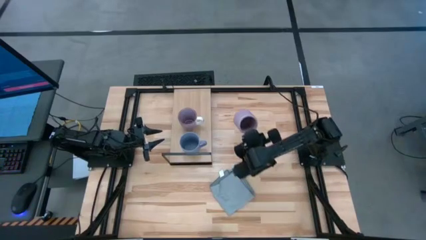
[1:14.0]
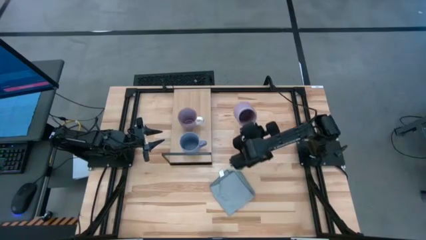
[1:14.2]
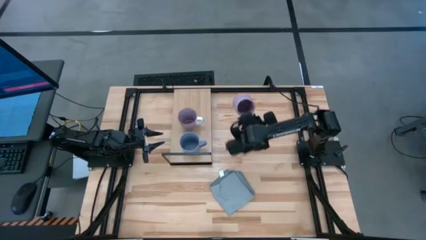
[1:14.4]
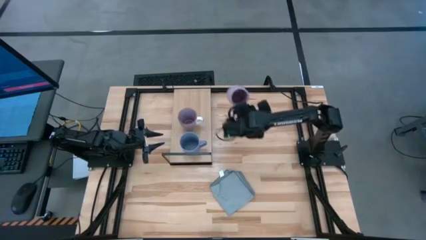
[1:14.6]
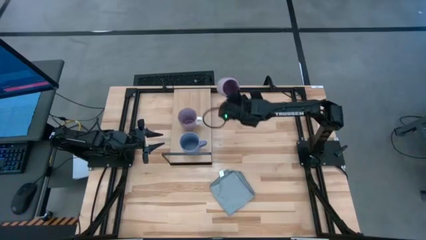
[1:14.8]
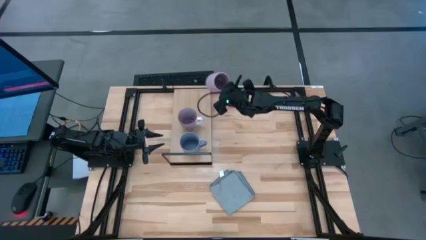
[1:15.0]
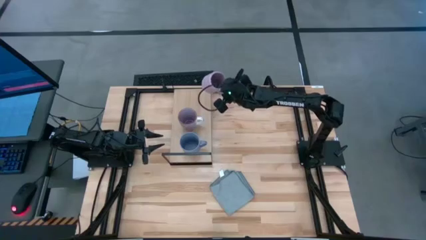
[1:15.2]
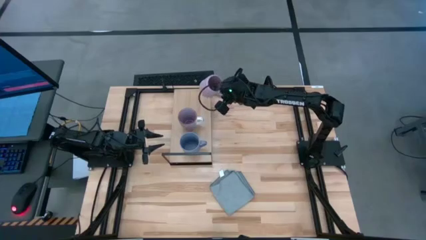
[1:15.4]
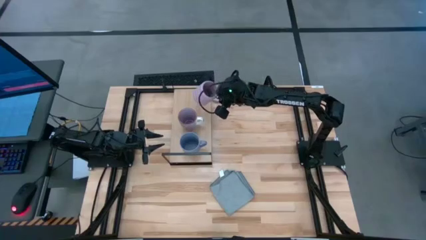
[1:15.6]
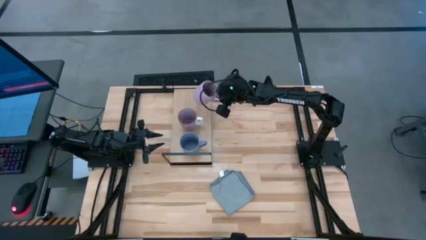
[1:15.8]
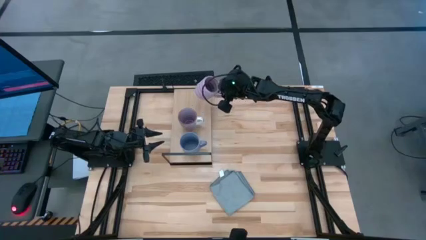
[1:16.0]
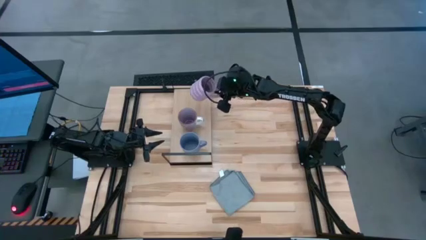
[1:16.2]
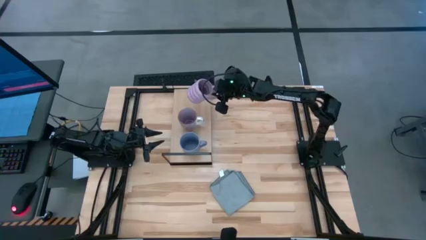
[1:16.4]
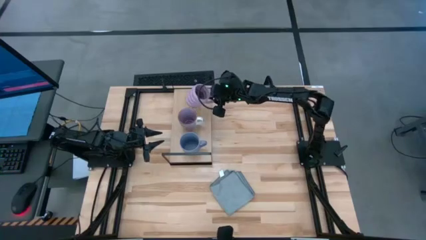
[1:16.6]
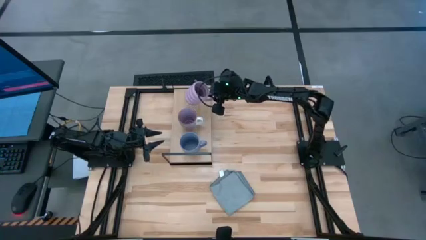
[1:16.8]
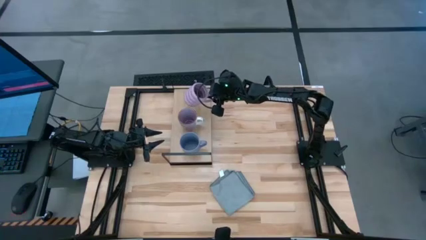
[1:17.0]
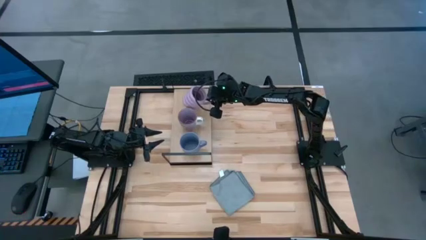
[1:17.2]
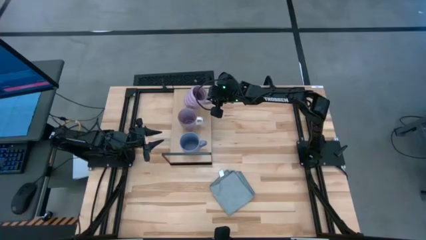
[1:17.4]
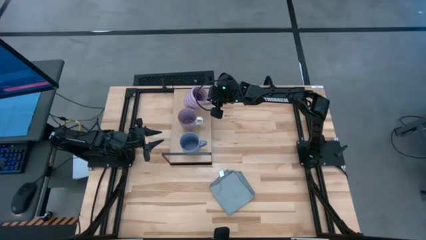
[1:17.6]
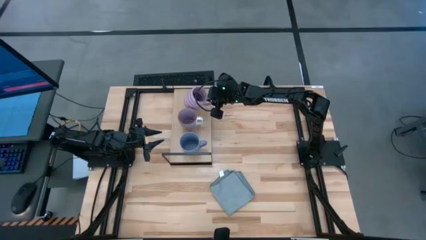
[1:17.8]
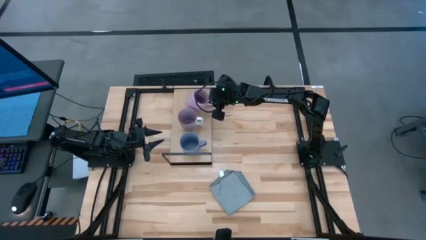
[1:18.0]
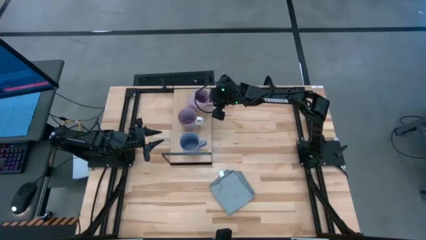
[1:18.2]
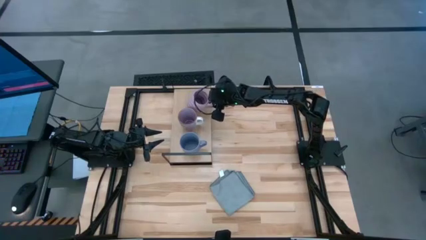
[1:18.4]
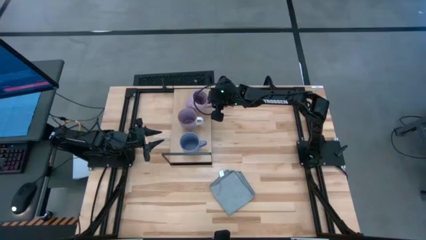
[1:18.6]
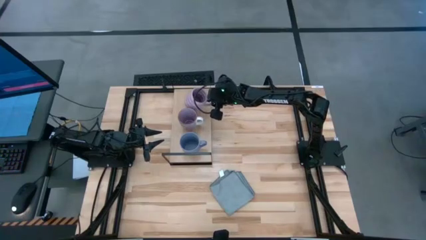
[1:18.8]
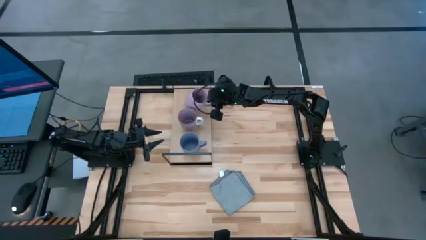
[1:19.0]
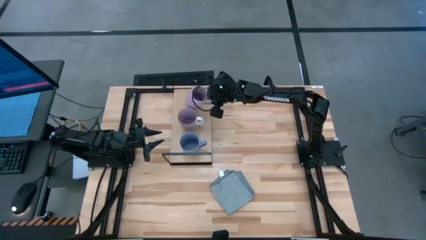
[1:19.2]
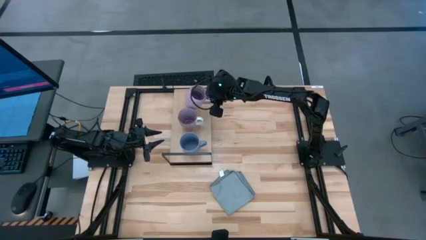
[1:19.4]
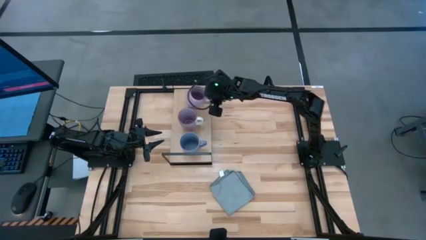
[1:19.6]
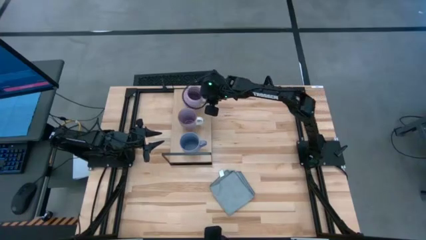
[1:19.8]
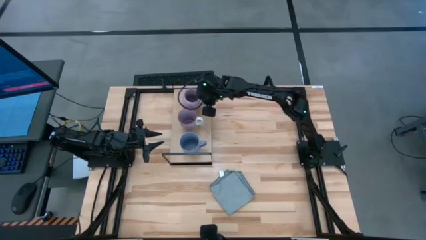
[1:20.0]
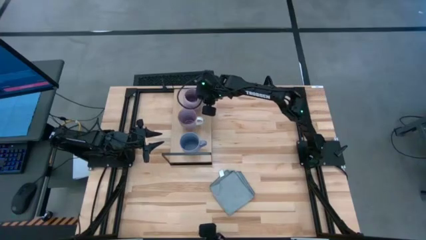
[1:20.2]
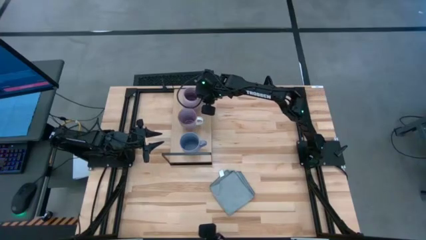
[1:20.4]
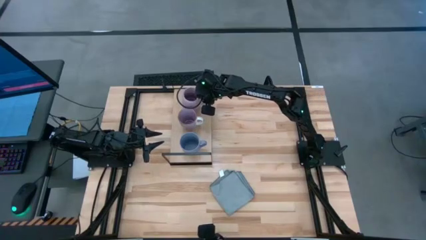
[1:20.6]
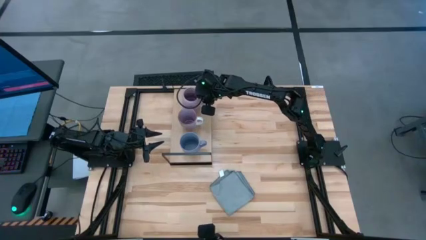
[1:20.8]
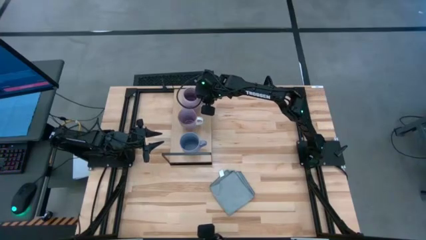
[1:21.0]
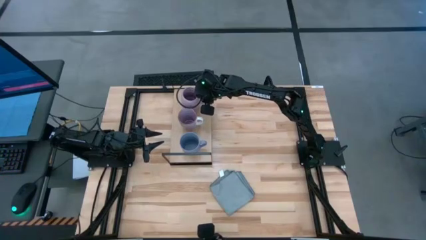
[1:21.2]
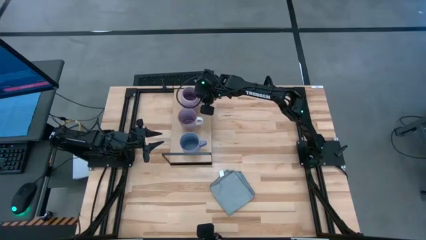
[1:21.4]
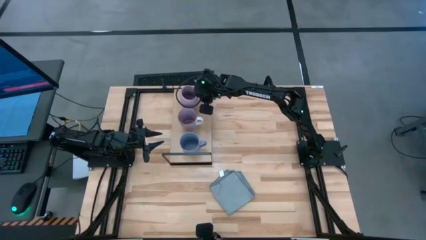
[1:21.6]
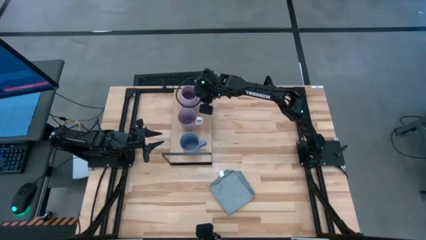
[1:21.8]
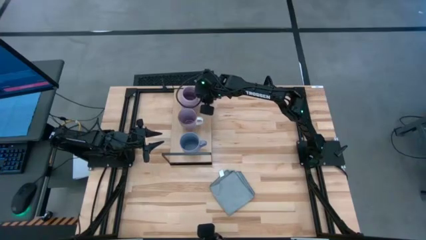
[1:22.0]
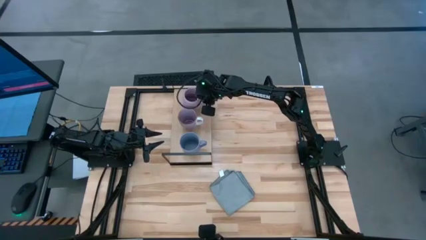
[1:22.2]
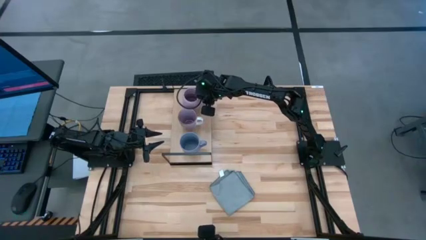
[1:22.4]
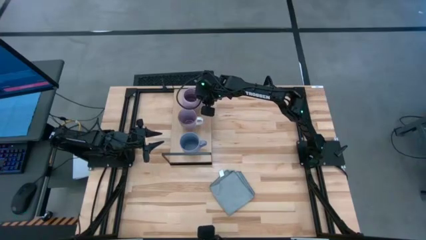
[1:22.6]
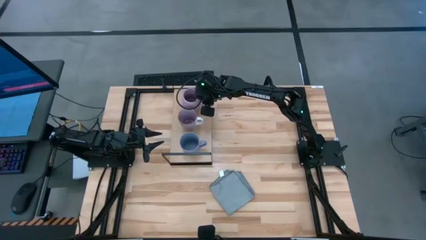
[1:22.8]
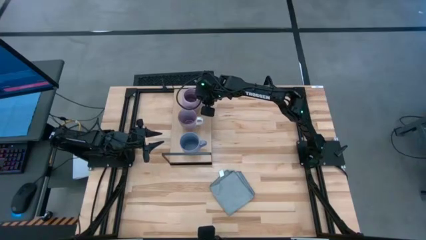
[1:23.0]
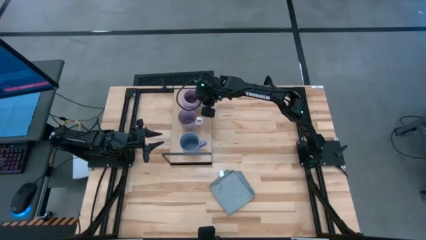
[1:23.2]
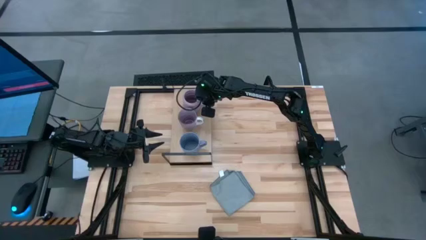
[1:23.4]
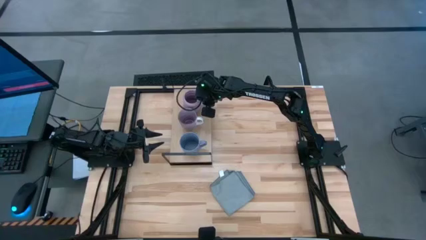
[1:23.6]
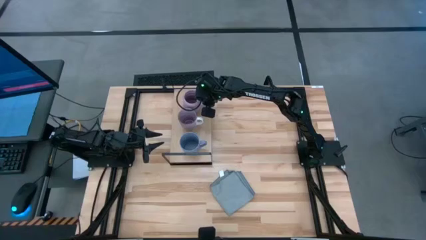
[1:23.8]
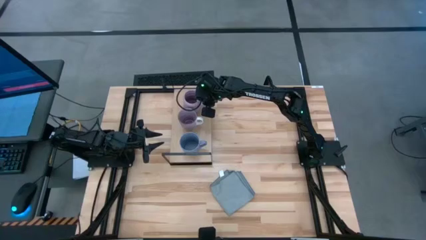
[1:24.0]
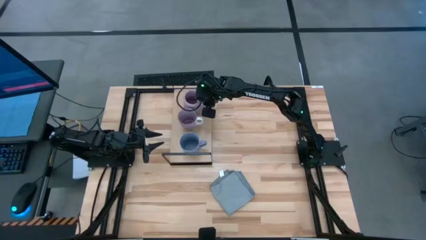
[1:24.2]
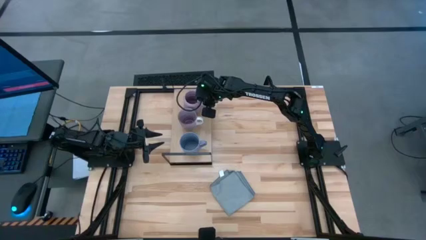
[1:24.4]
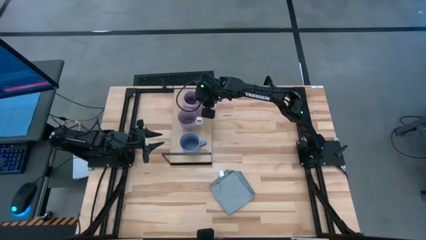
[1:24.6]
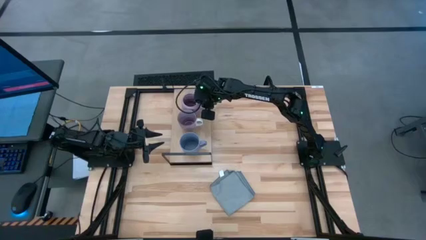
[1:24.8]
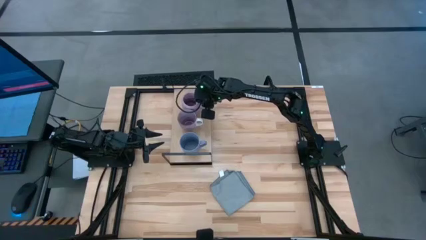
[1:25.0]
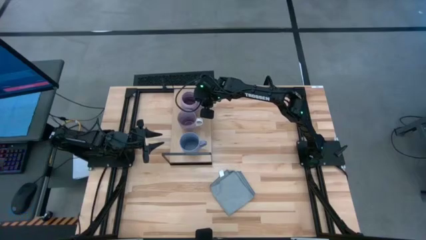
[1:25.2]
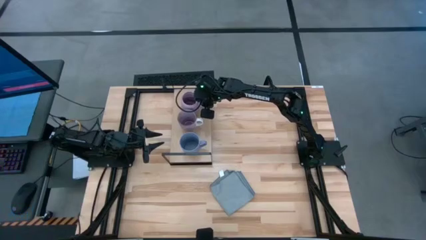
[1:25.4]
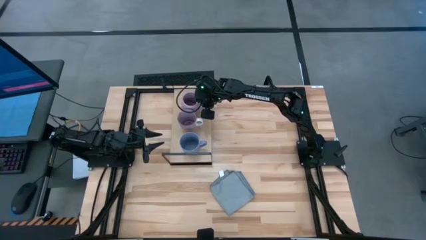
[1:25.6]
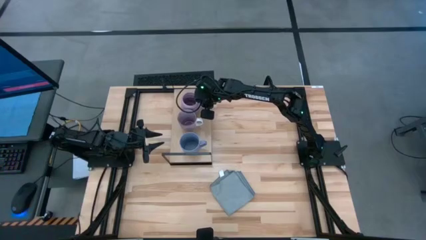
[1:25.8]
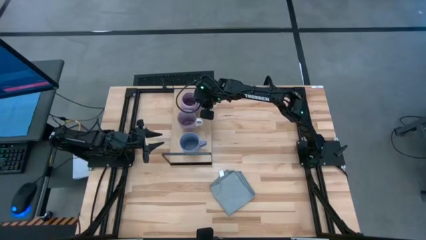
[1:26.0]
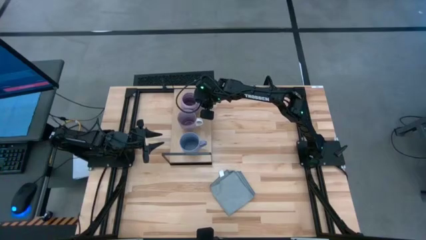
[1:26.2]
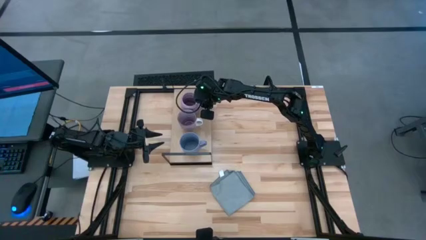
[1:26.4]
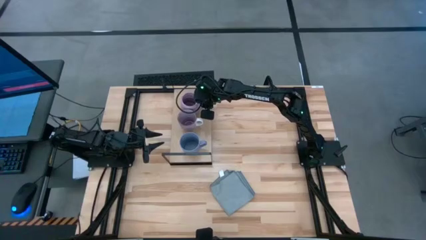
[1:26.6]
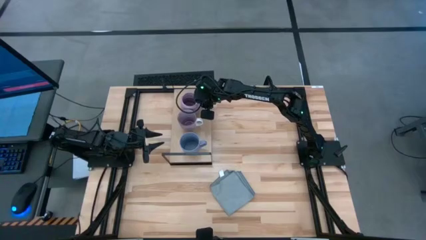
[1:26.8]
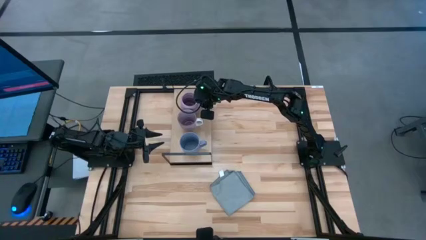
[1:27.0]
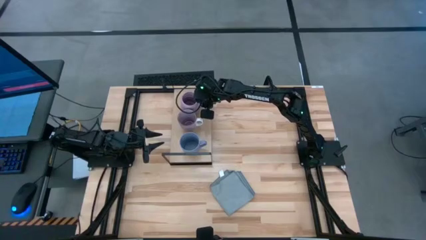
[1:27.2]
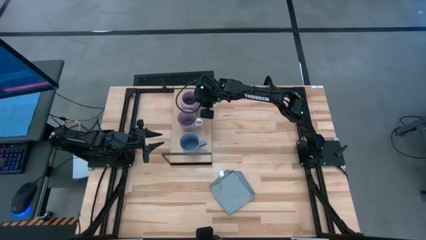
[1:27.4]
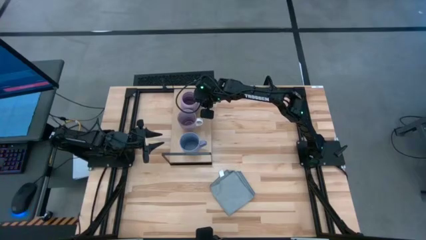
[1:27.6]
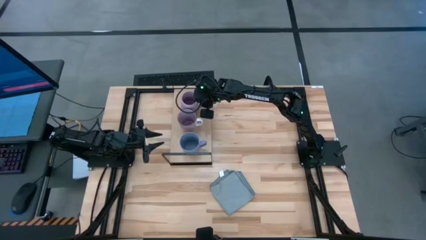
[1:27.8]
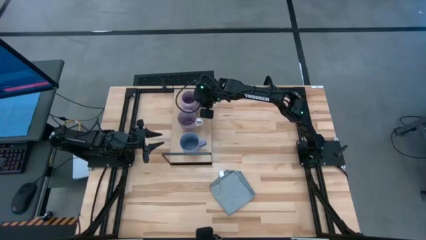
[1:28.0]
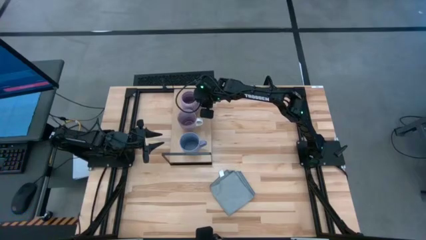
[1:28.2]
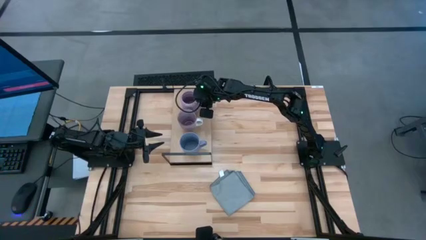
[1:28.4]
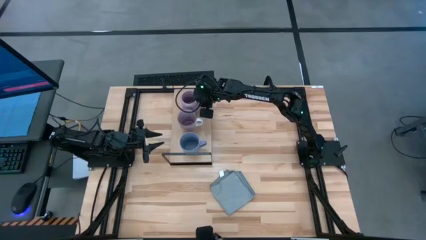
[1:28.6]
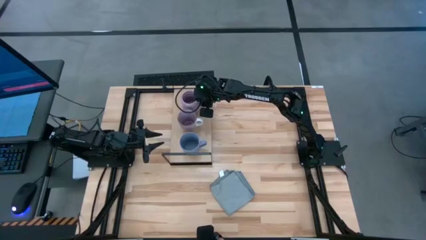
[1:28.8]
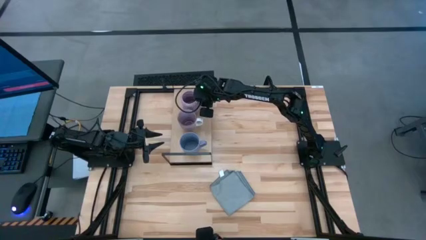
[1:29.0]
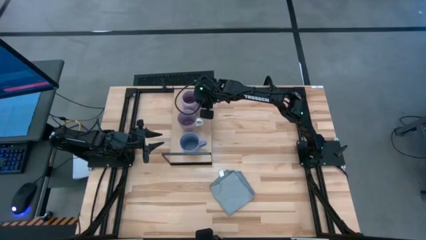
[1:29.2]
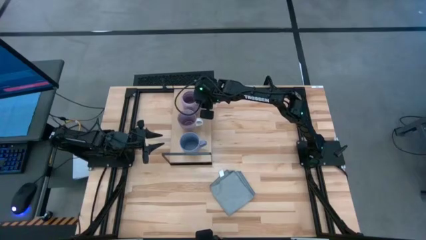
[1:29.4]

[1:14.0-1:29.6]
Task: Stack small to large cups/mugs on shelf
Put the light purple cup on the shelf
